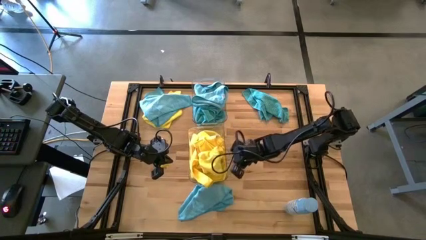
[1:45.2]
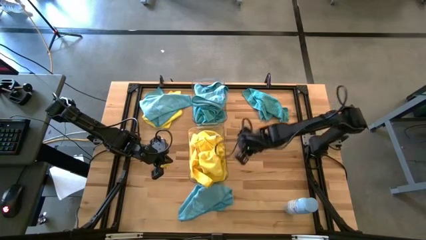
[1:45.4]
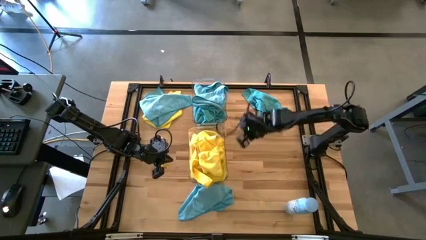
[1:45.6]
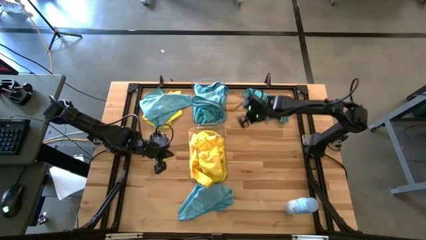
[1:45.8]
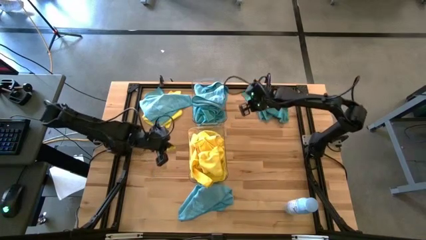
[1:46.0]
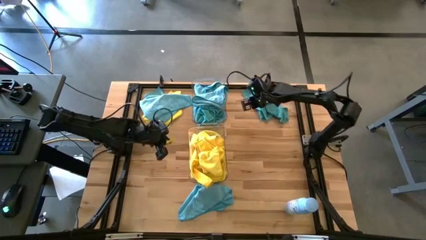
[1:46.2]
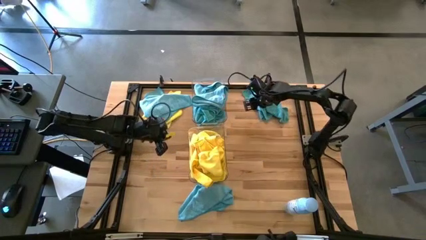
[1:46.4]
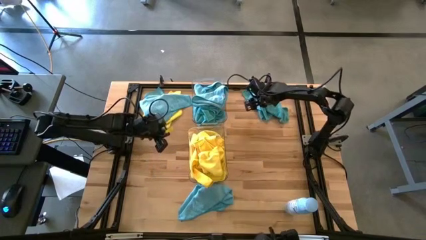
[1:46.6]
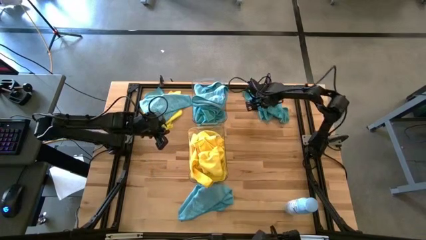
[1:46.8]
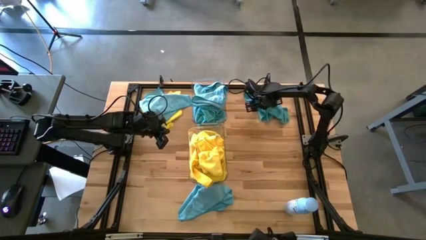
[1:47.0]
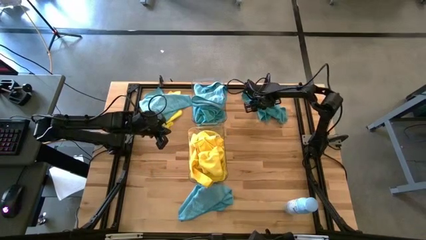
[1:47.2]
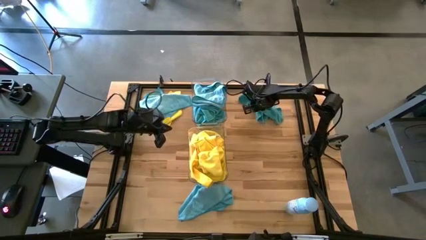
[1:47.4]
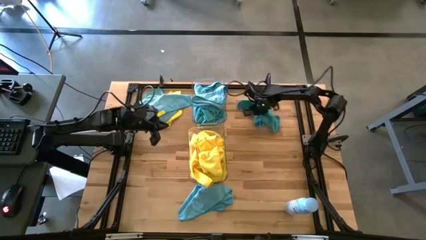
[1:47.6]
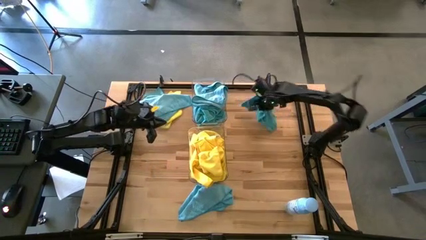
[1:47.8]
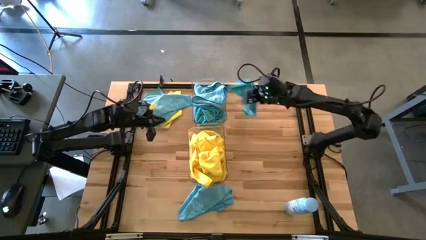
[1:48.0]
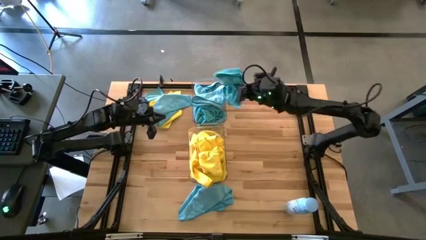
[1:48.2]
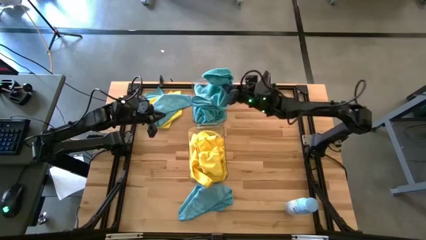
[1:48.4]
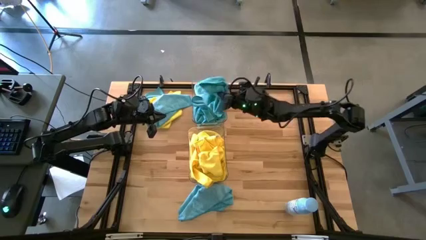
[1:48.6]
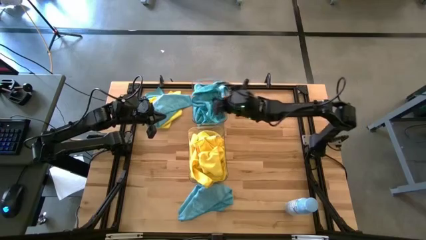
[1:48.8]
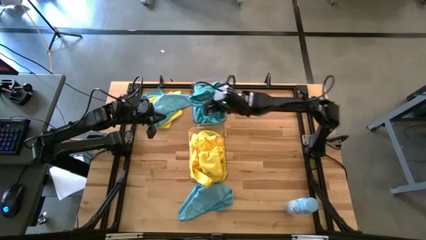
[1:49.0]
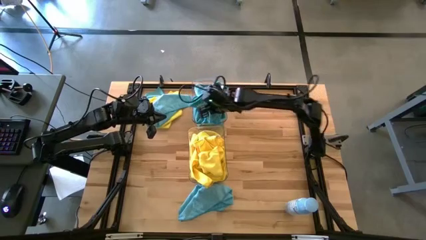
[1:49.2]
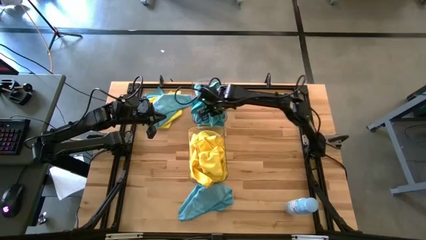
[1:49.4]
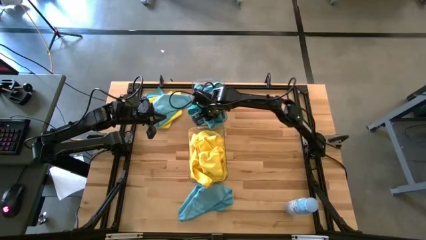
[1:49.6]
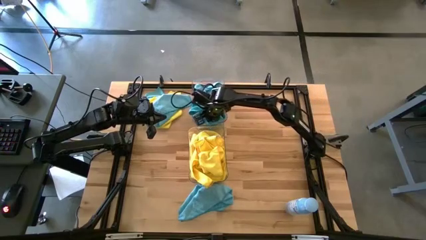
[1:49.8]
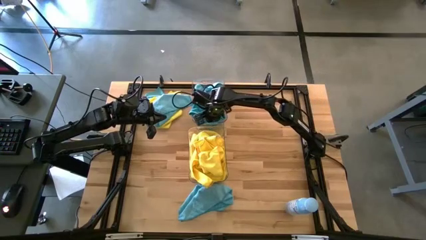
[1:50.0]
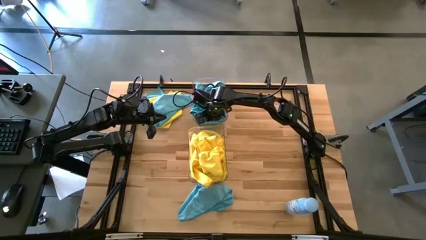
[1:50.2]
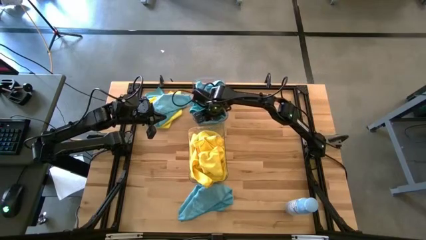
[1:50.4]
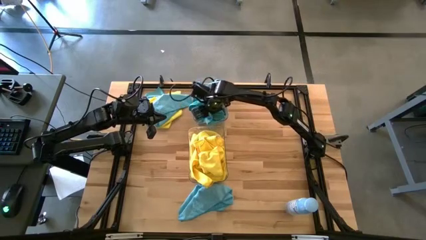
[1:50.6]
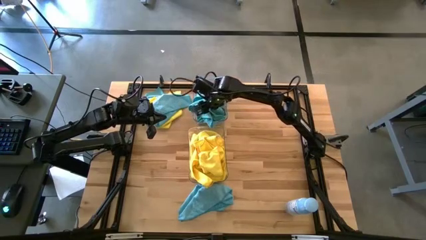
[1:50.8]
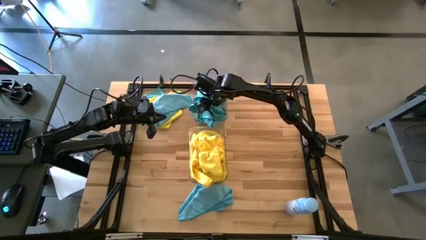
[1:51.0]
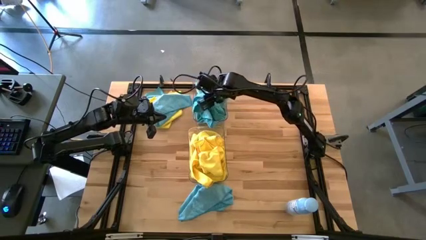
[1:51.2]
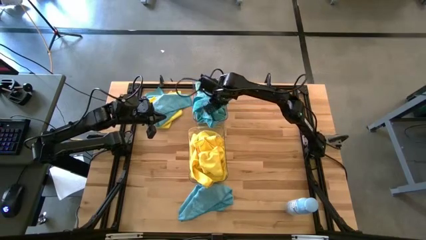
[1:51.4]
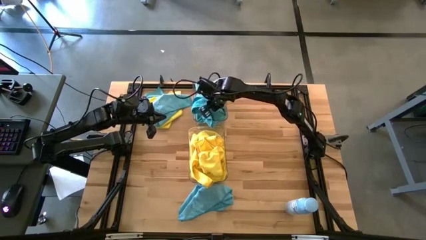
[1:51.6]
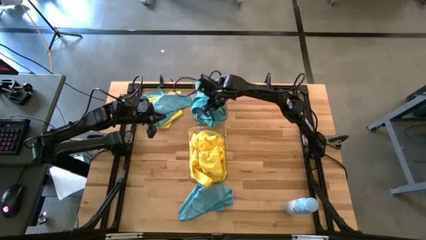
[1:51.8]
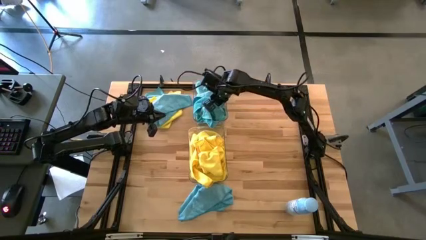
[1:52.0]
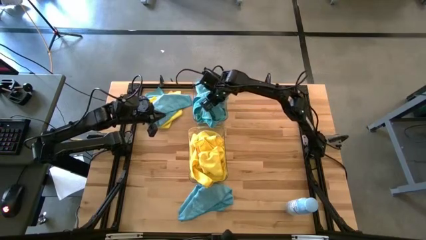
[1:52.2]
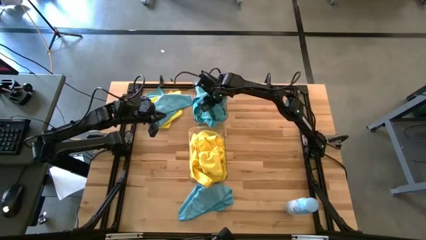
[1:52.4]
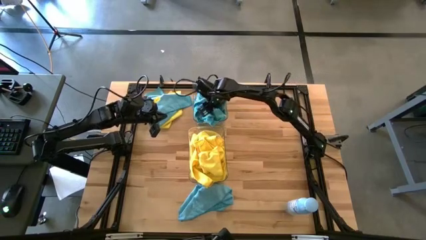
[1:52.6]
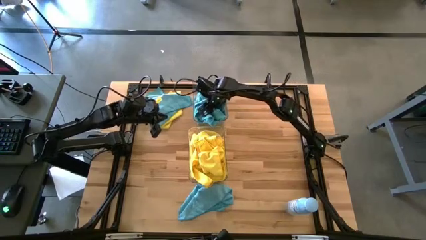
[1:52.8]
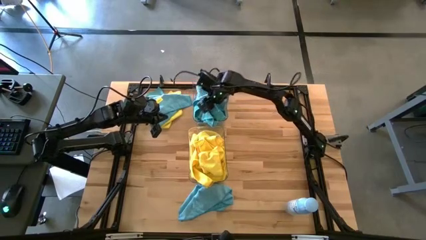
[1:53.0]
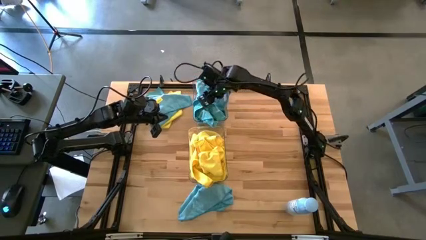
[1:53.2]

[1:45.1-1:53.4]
Task: Sort microfiber towel by color & place in baskets
Put the blue towel into the top transparent bin

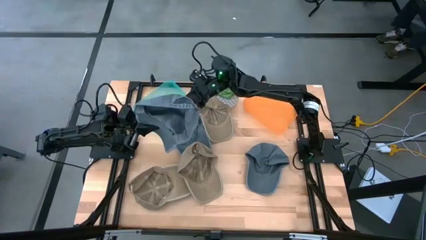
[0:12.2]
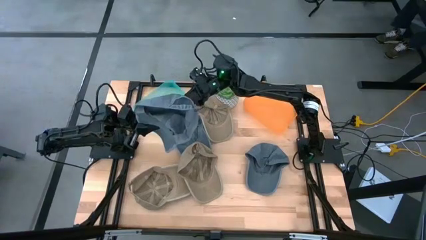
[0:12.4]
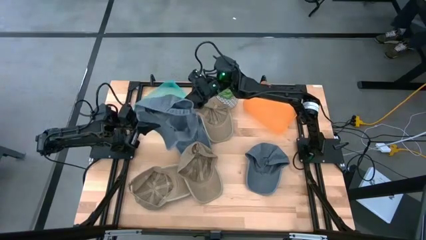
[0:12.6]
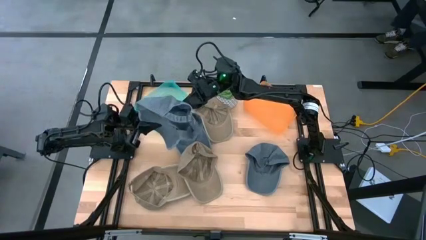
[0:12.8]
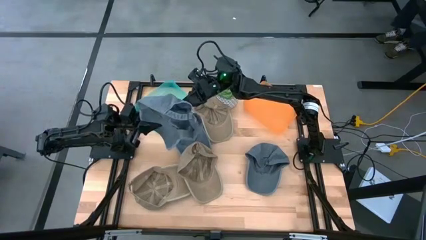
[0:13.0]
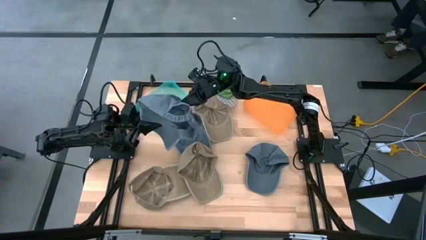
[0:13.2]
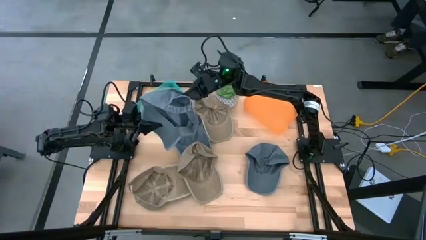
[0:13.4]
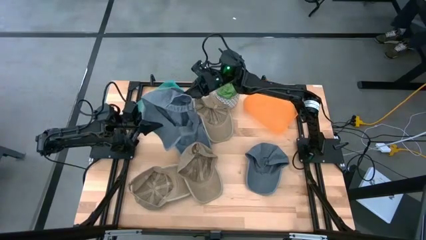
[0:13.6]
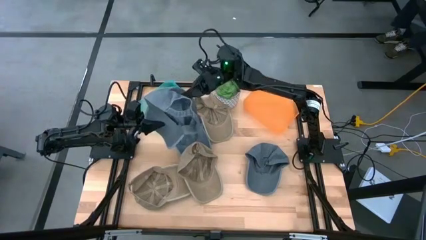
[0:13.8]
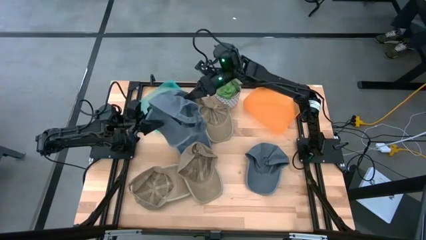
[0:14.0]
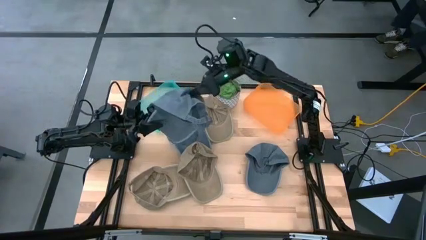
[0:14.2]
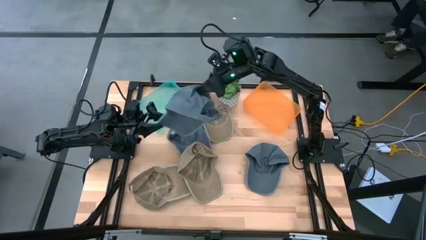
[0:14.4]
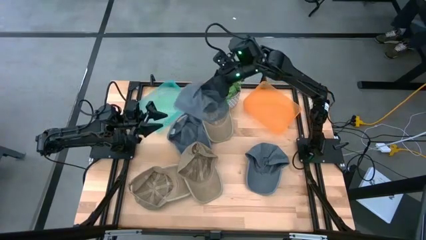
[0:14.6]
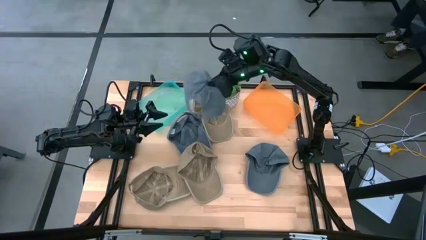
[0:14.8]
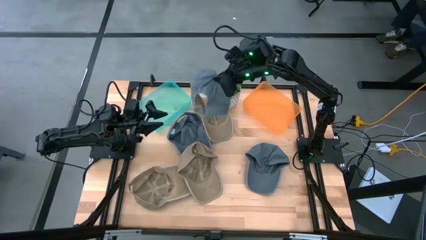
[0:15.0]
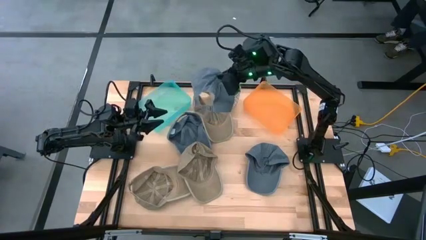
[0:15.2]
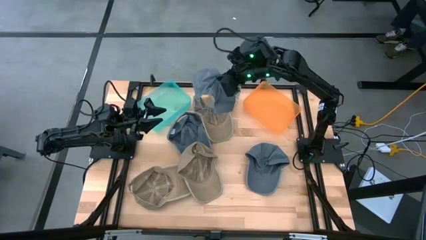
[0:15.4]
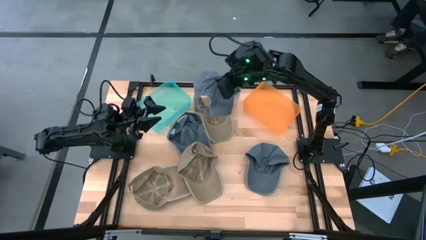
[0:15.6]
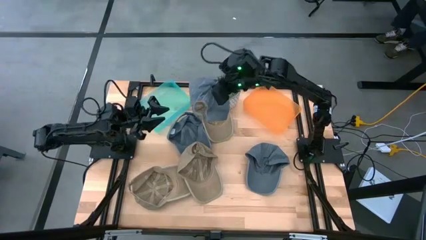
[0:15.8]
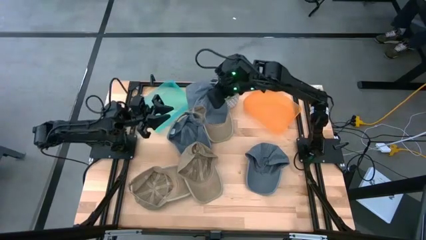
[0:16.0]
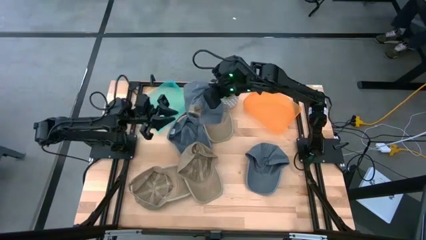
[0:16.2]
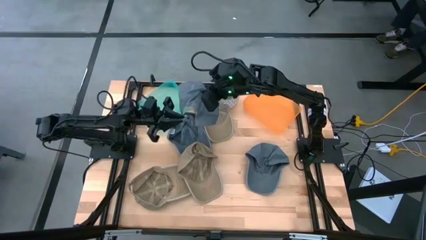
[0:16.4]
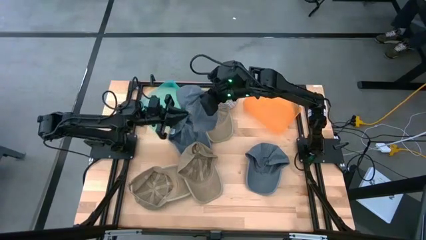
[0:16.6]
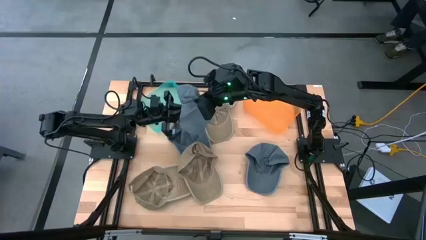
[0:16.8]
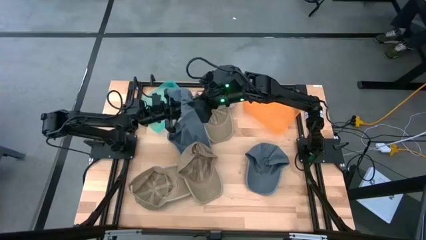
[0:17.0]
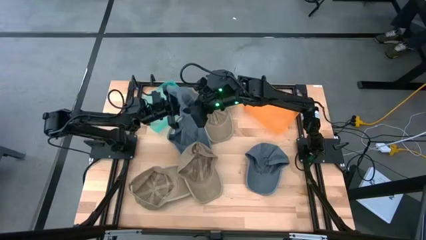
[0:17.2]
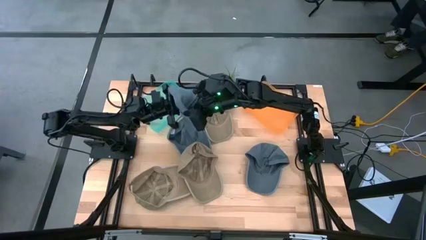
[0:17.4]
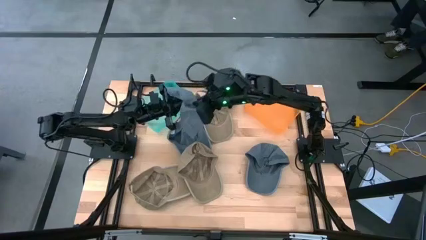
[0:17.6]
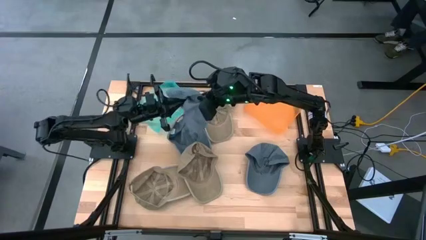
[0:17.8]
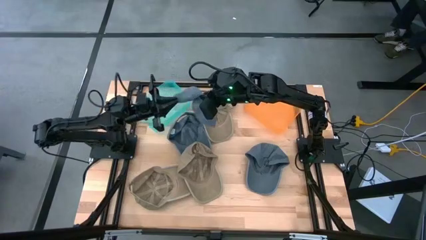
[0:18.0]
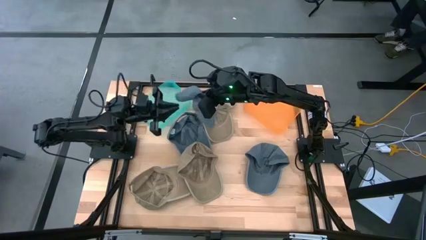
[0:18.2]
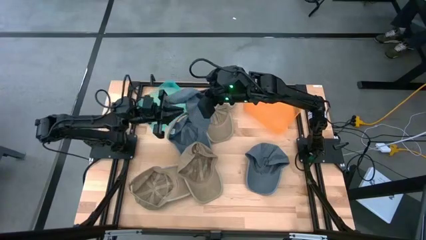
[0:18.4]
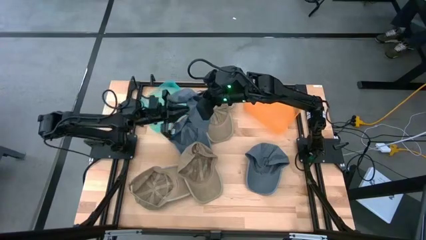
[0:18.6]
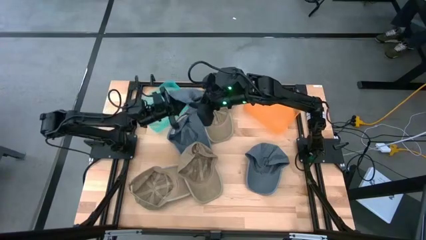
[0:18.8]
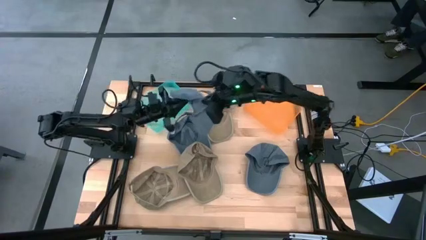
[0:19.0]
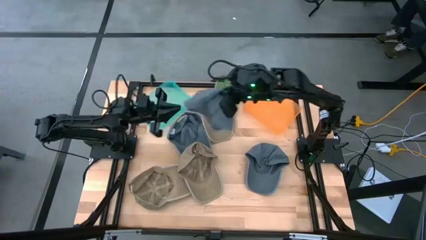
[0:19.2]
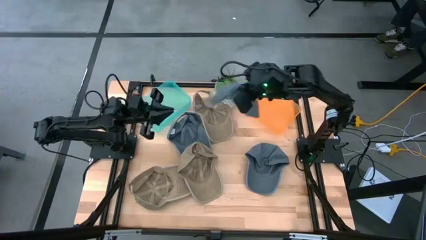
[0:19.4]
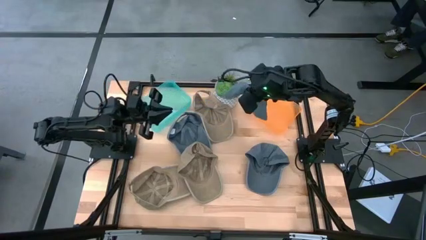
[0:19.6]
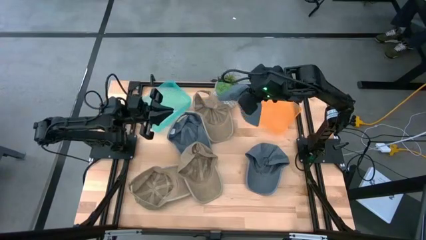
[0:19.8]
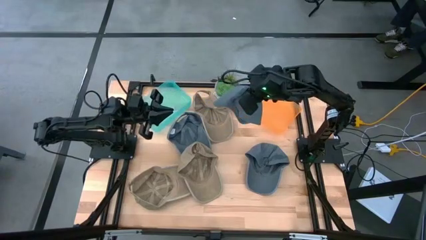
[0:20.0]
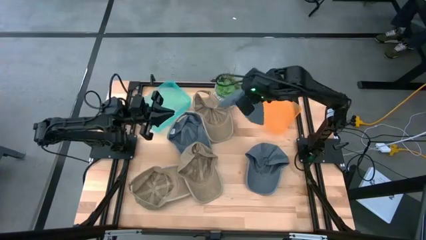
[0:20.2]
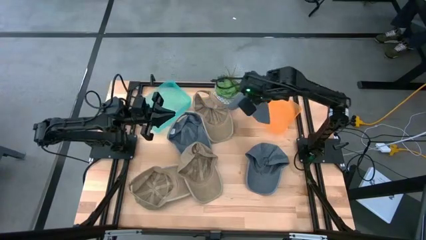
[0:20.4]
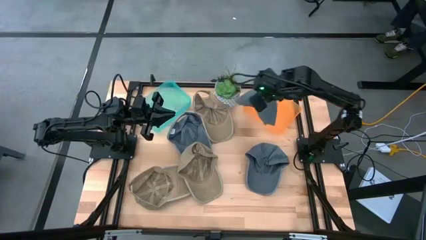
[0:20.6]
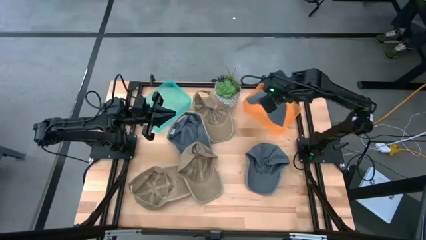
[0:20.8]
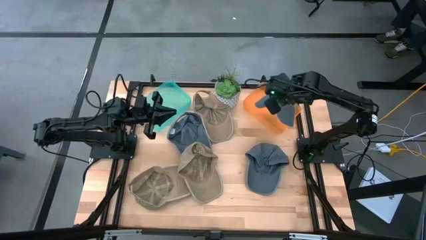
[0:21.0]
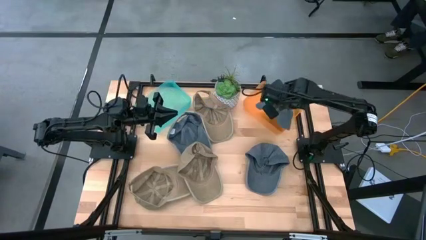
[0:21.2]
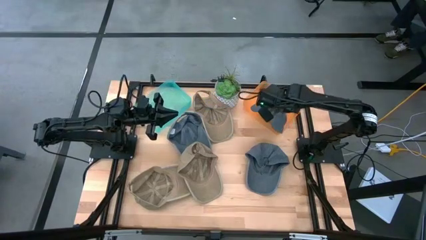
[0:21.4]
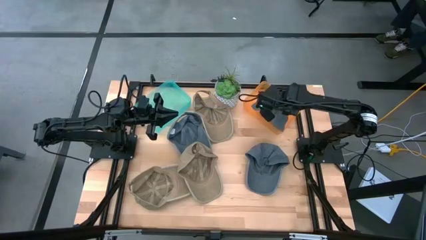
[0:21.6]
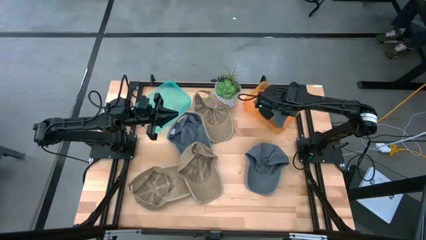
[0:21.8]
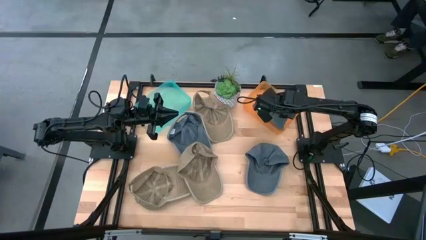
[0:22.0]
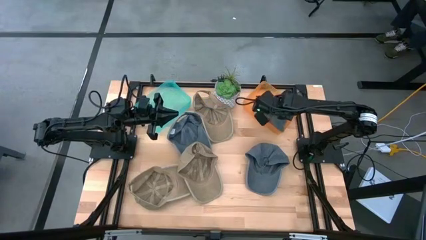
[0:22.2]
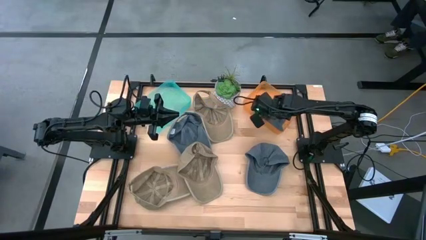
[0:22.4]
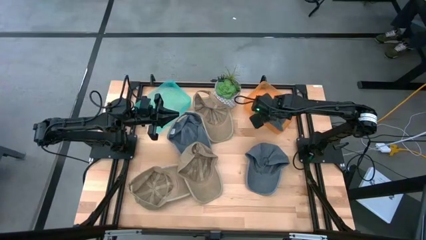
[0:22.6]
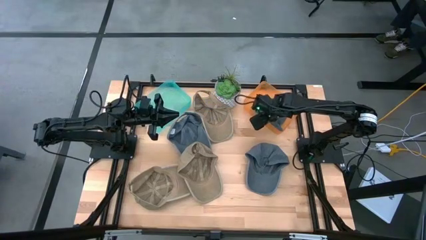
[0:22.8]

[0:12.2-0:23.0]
Task: Pick & Place hat
Put the middle blue cap into the orange bin
